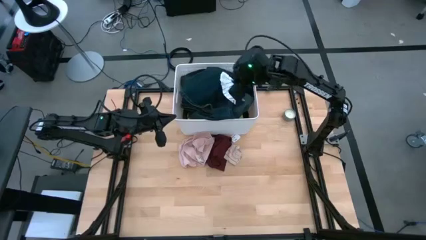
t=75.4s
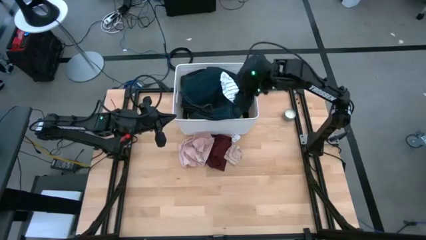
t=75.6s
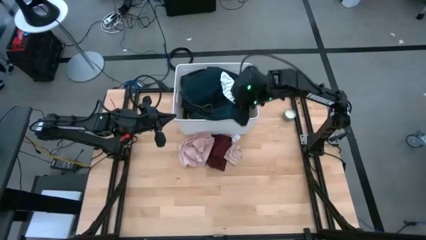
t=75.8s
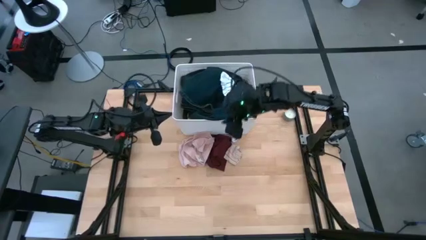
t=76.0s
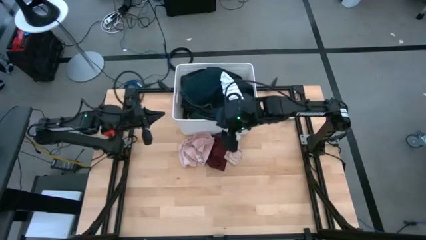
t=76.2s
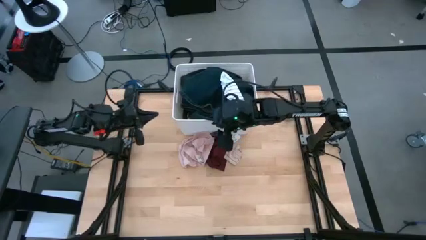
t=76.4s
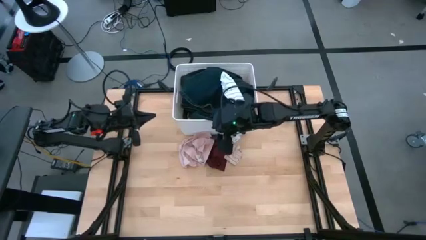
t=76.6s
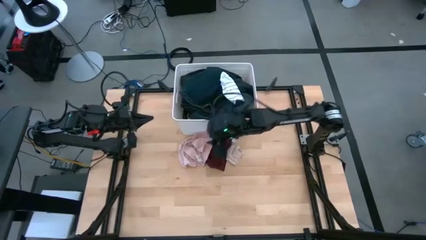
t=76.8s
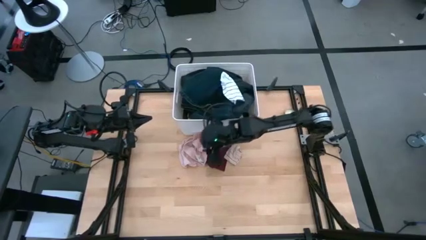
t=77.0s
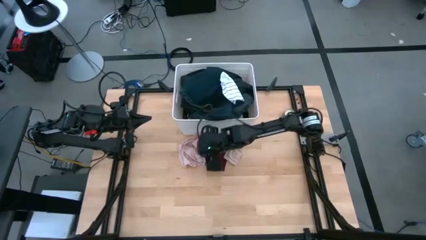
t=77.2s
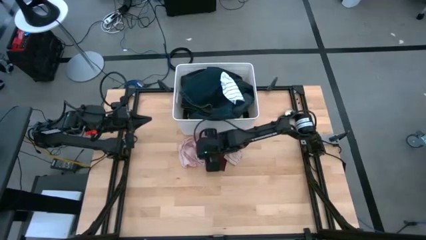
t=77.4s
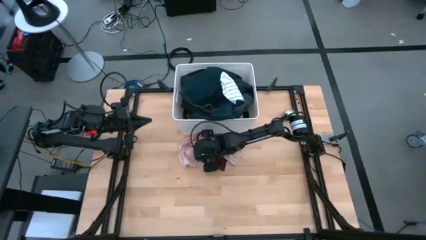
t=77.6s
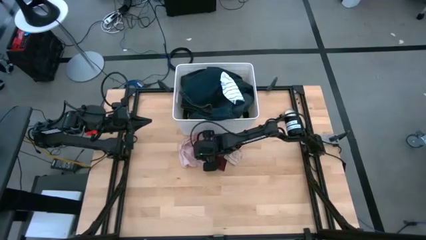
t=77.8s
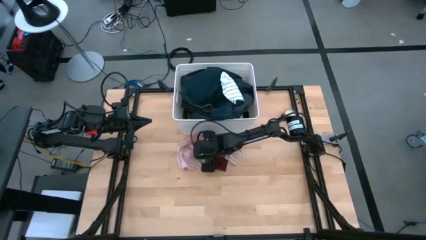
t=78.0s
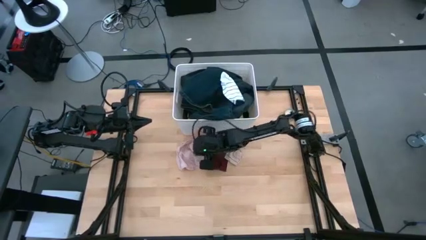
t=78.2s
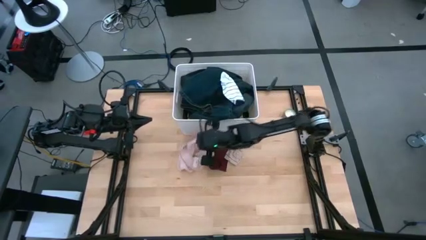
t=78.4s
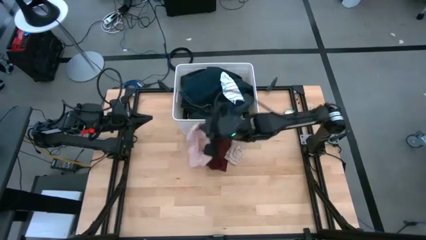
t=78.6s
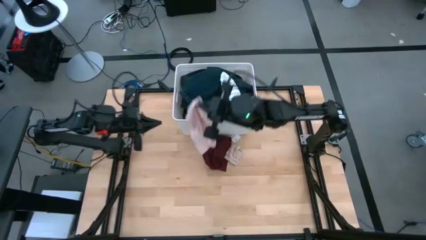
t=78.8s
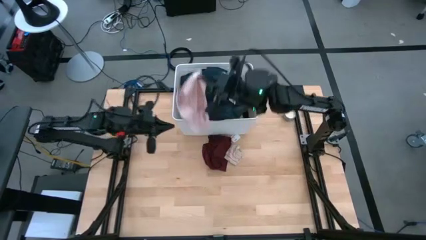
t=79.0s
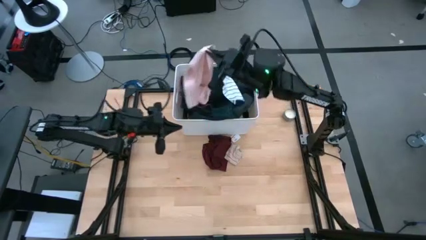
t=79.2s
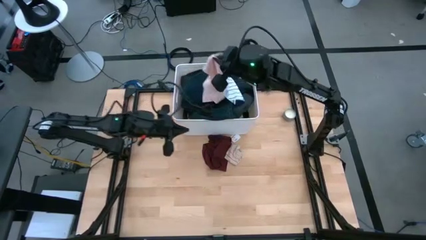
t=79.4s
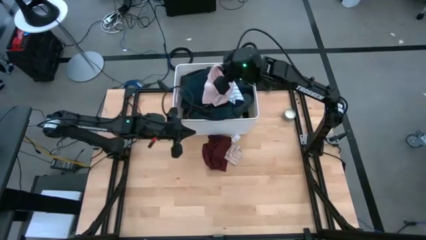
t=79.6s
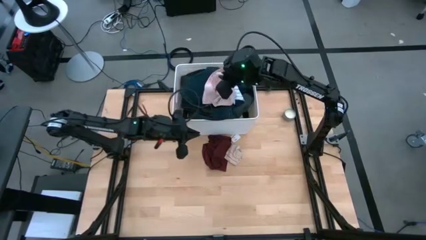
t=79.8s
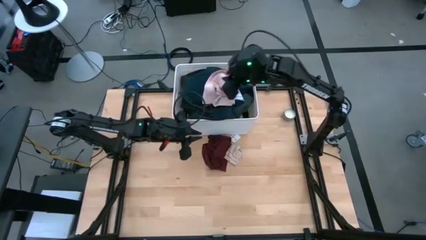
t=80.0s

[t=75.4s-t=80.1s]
Task: Sort clothes
Put the pink underwear into the white bin

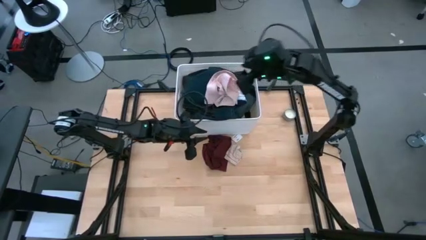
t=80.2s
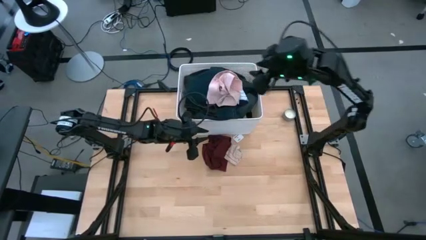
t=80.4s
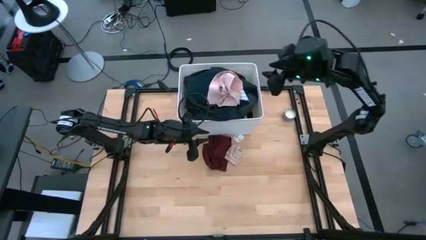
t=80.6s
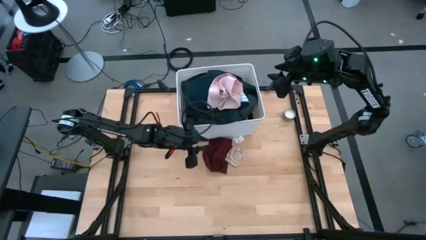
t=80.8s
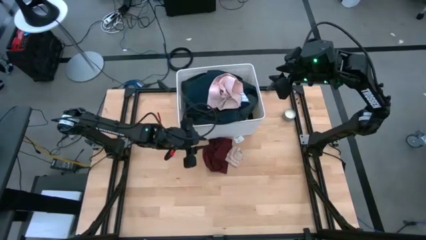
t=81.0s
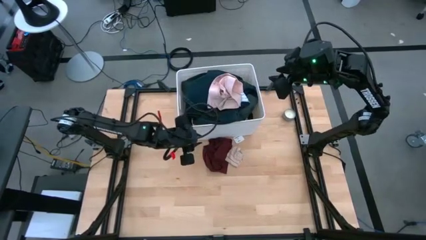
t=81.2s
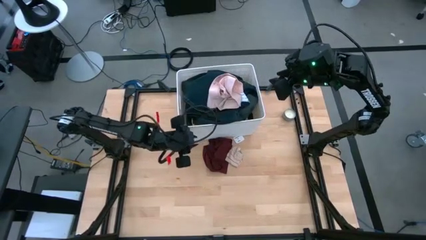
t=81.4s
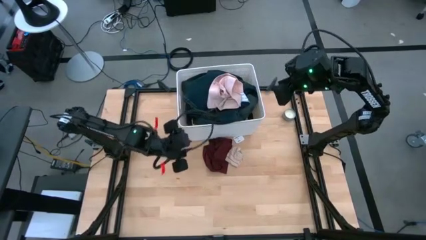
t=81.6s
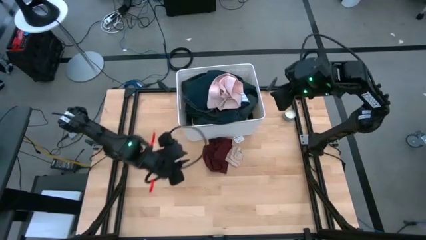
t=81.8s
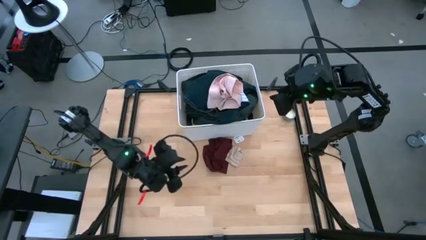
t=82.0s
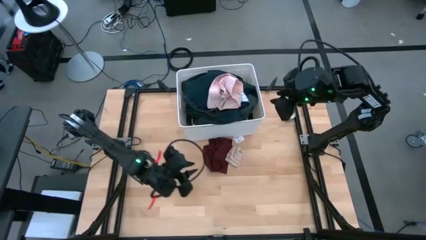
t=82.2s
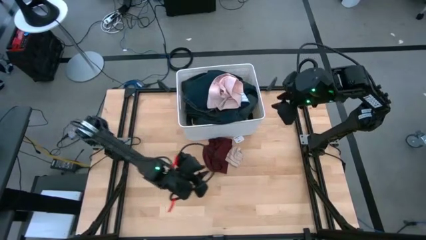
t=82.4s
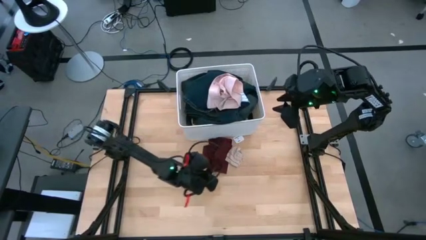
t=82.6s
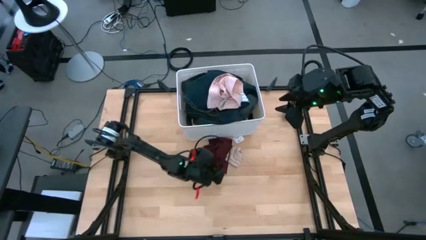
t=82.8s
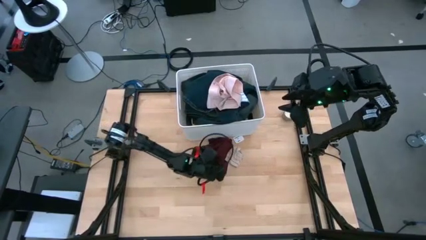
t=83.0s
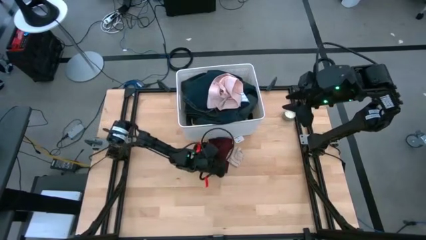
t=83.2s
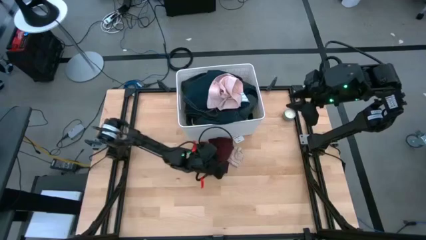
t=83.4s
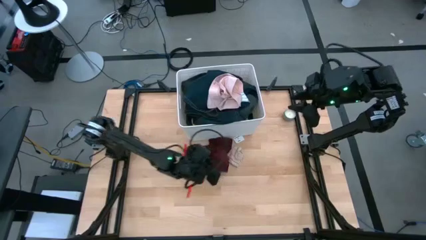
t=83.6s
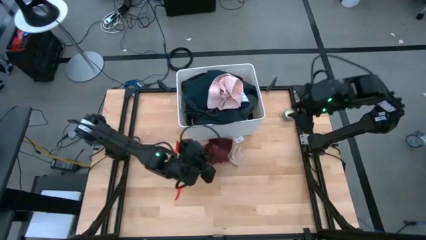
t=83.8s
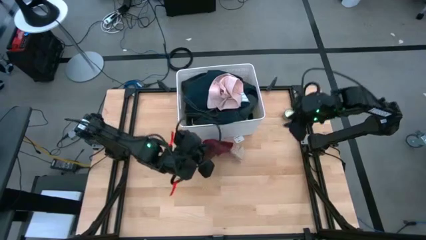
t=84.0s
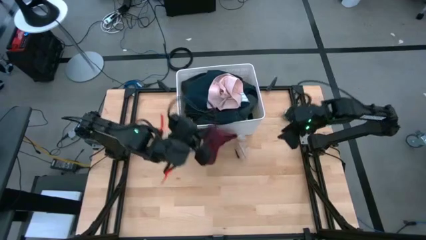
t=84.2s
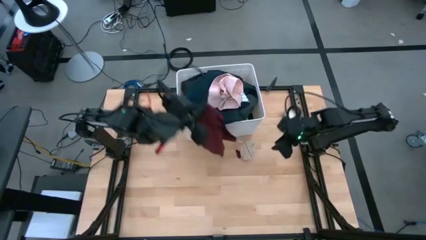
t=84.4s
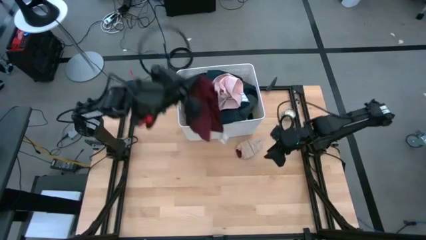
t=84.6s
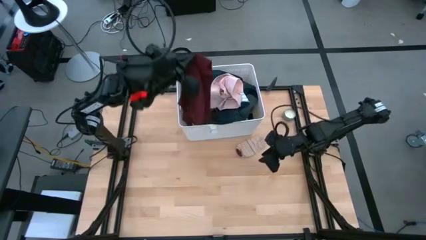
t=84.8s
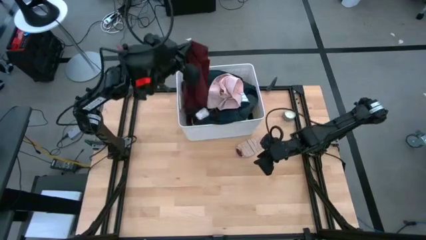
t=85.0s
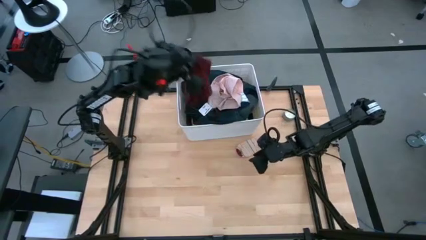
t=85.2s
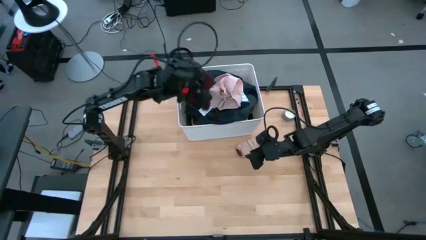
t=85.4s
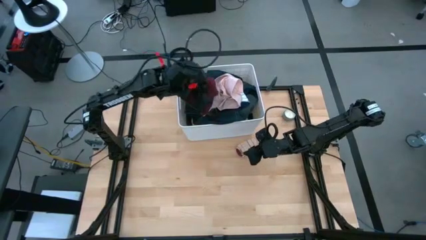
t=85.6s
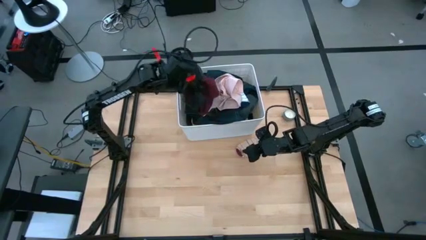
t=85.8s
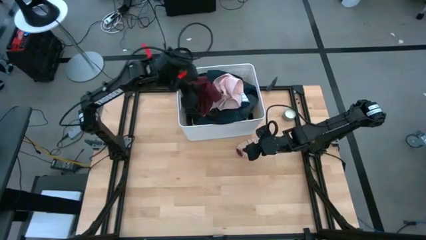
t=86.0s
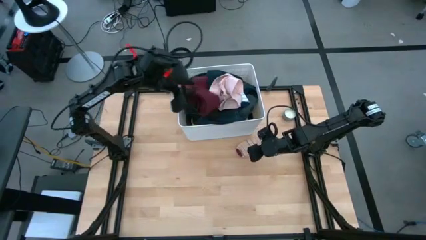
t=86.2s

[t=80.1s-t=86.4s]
Put the red underwear into the white bin

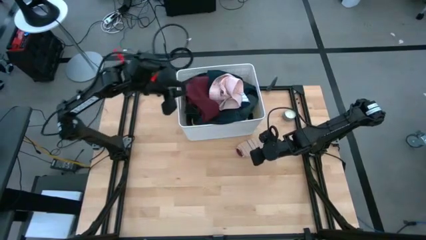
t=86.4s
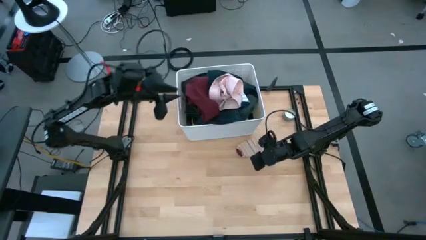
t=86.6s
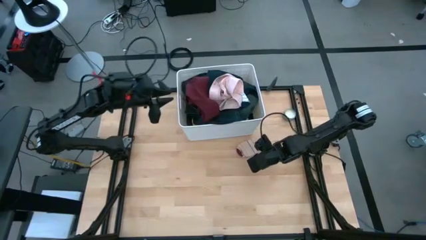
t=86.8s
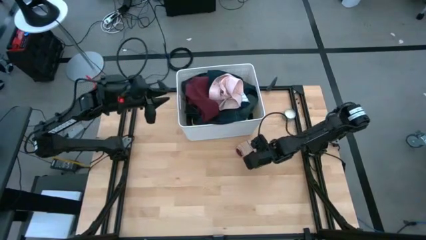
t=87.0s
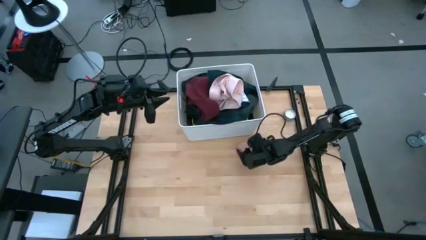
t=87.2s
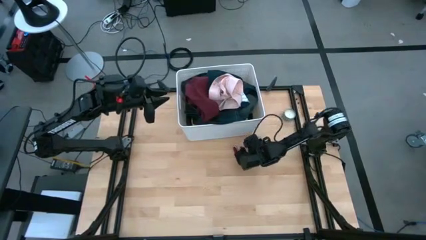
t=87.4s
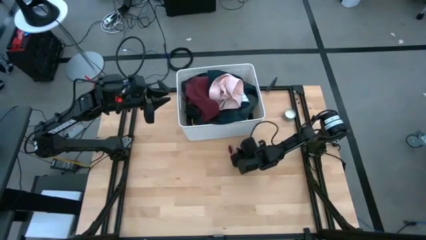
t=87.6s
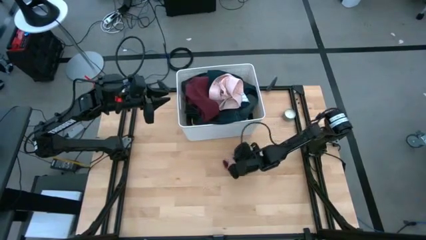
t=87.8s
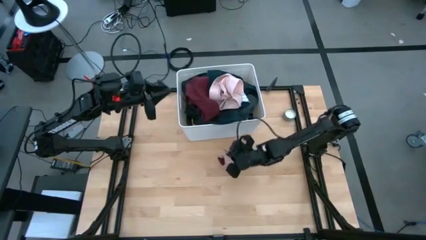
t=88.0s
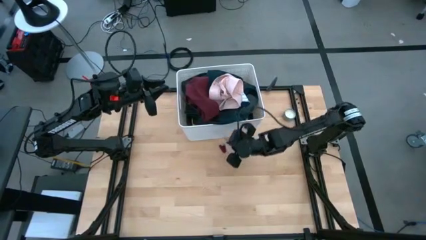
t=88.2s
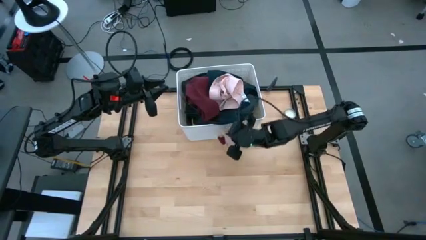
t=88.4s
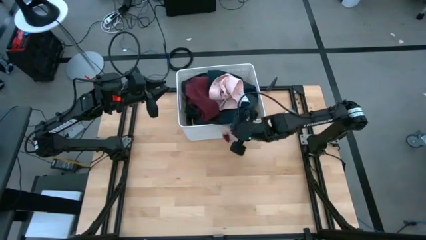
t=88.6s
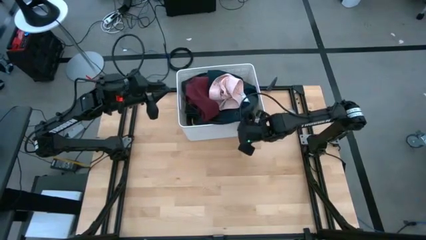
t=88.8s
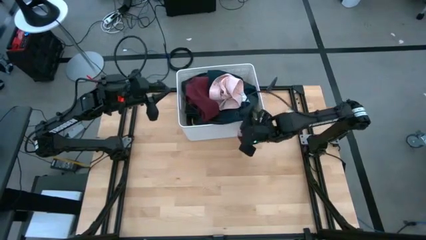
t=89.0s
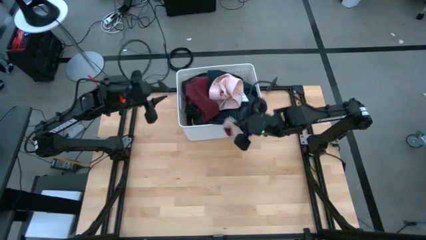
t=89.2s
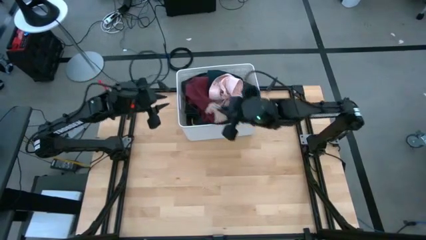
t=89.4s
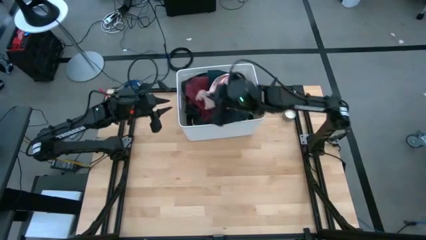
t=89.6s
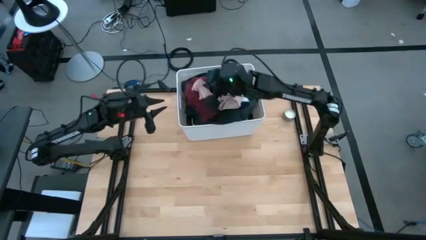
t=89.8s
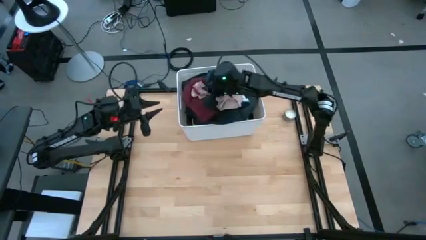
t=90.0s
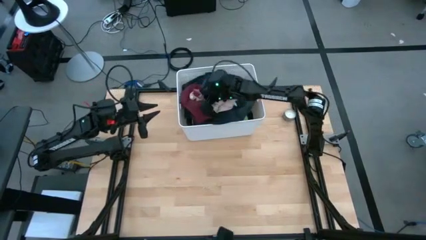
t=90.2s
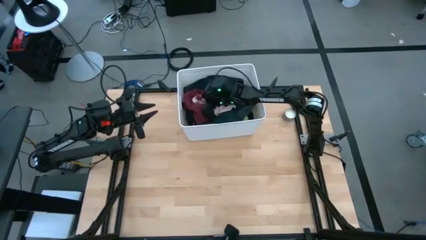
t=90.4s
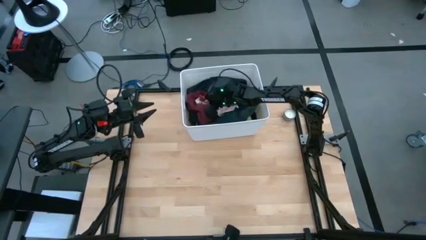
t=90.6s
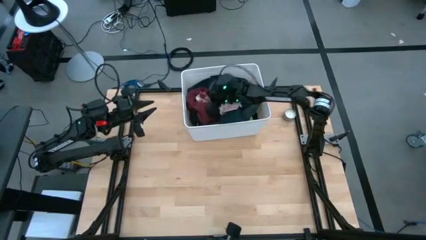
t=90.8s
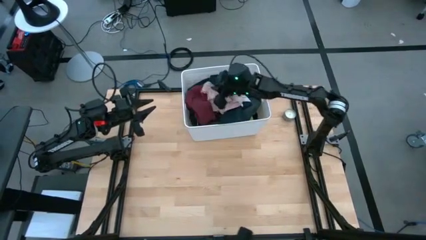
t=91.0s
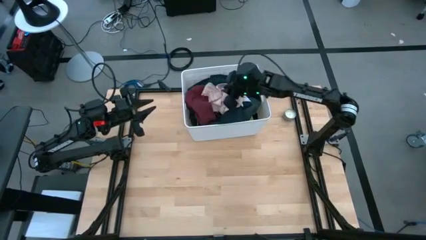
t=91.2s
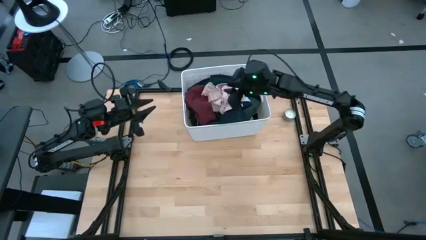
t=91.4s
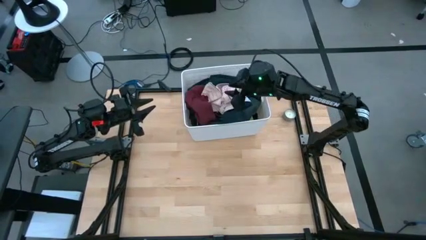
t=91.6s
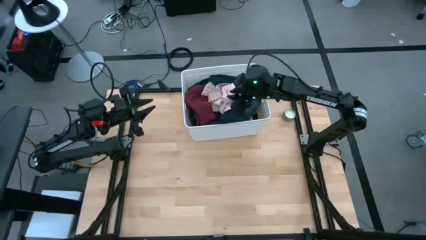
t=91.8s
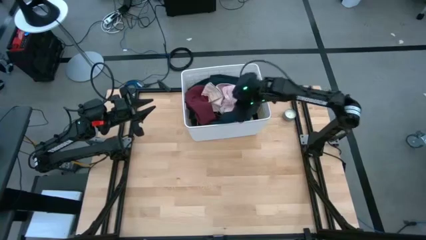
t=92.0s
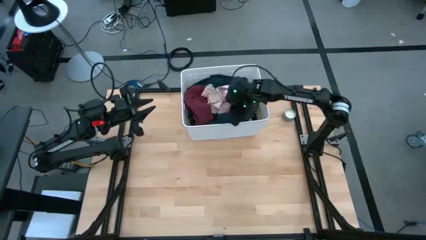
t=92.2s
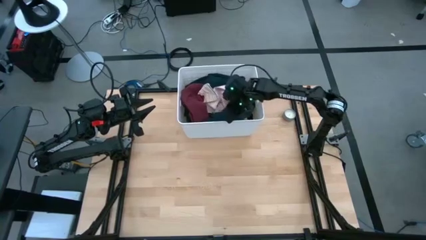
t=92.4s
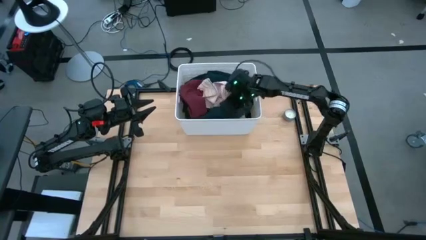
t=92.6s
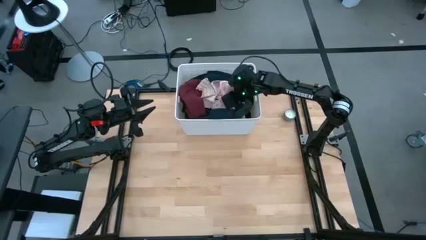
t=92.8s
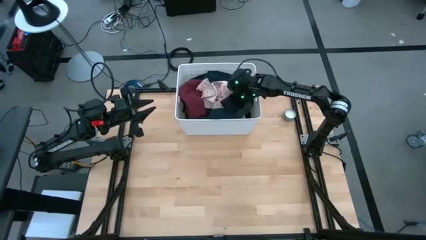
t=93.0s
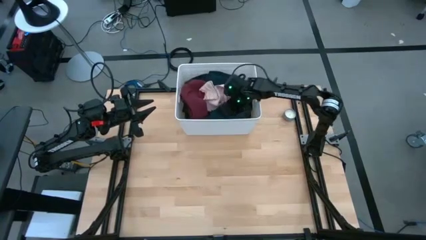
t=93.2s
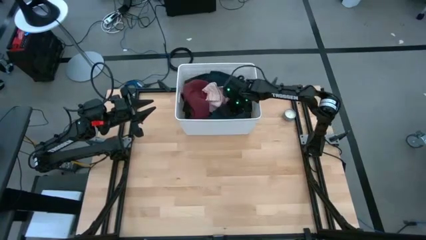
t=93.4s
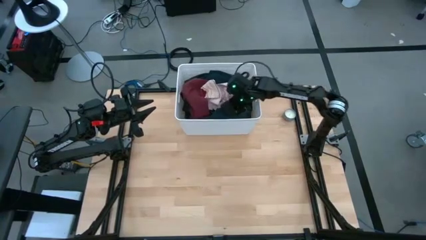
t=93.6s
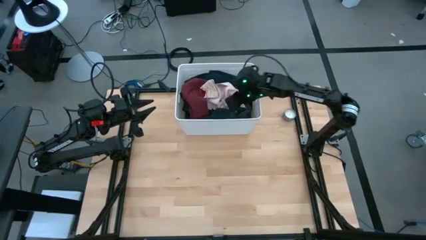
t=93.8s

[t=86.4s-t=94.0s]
Put the pink sock into the white bin
